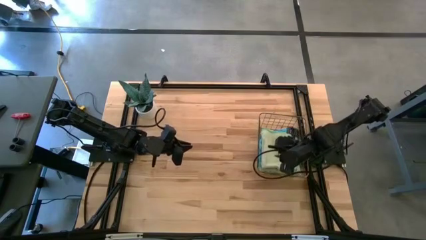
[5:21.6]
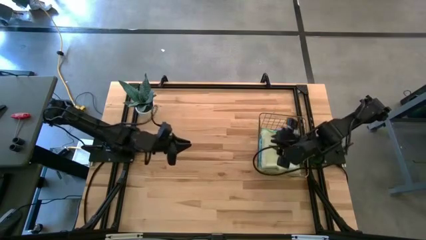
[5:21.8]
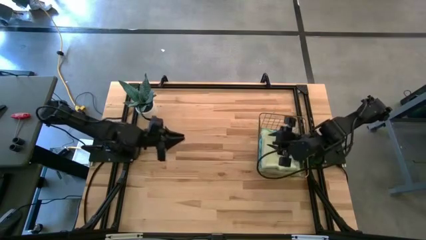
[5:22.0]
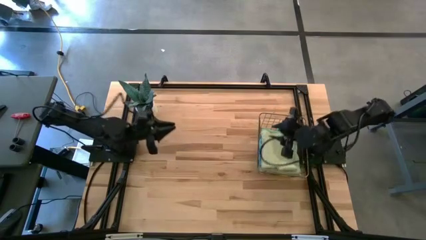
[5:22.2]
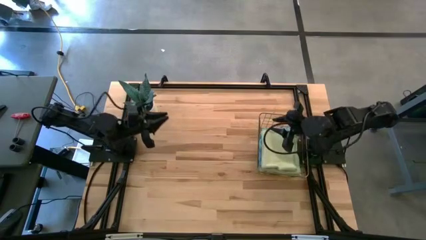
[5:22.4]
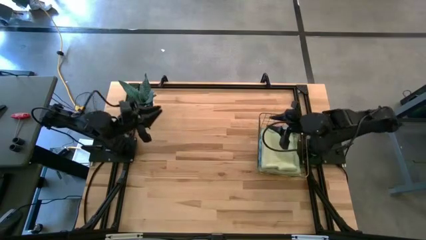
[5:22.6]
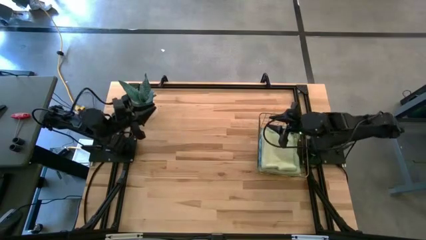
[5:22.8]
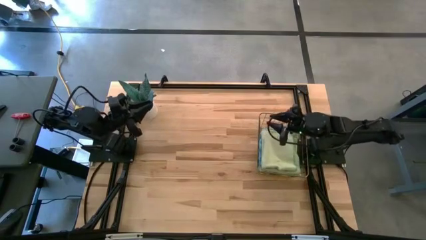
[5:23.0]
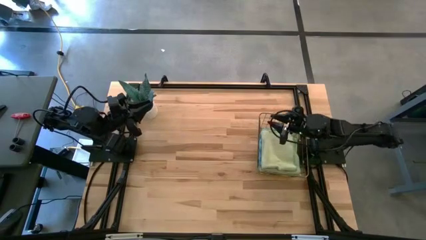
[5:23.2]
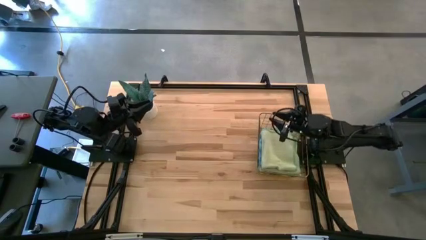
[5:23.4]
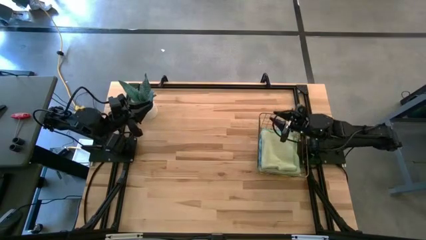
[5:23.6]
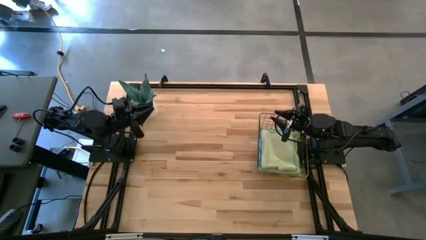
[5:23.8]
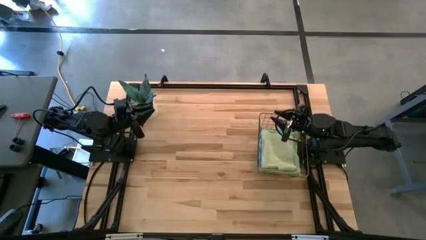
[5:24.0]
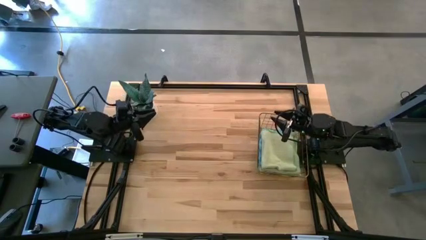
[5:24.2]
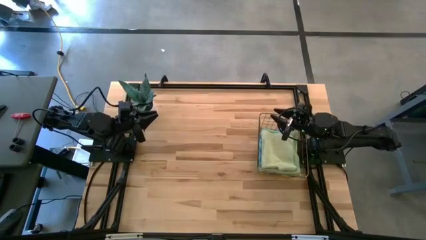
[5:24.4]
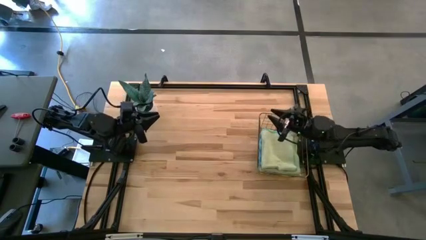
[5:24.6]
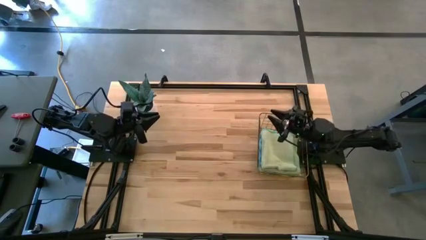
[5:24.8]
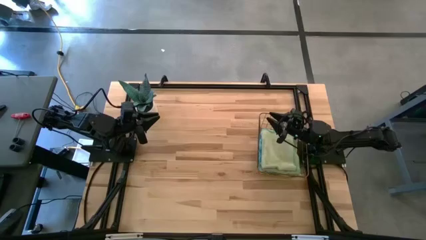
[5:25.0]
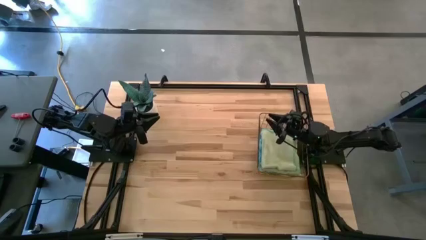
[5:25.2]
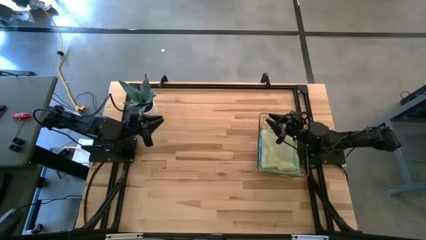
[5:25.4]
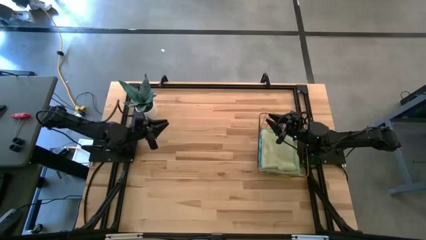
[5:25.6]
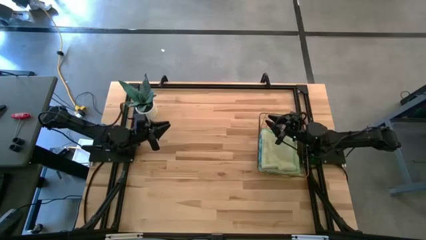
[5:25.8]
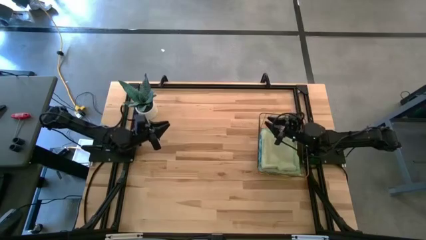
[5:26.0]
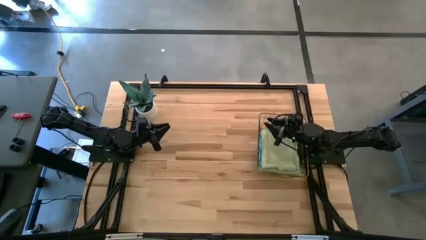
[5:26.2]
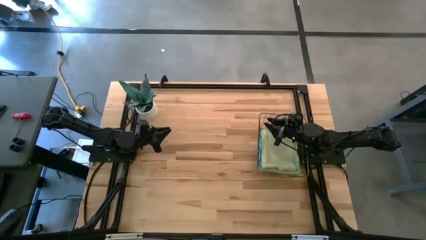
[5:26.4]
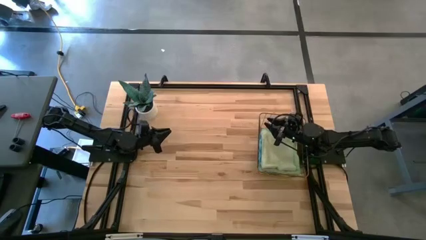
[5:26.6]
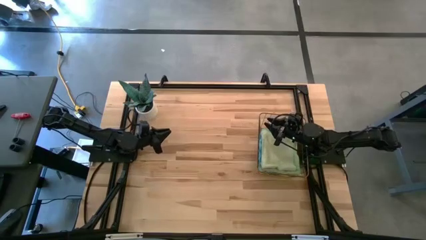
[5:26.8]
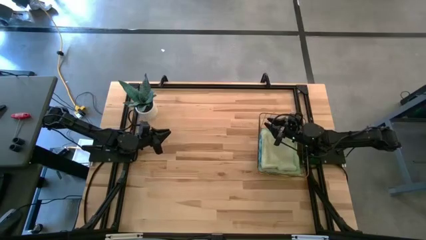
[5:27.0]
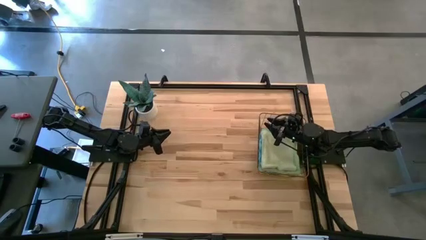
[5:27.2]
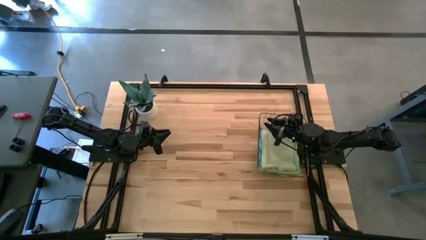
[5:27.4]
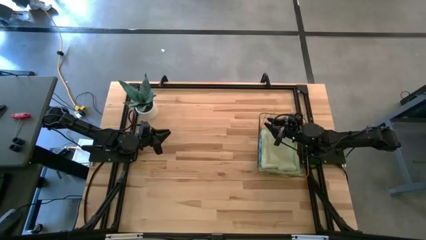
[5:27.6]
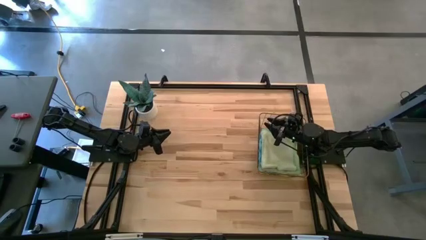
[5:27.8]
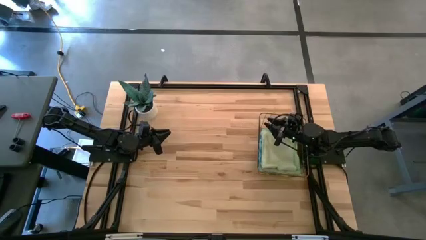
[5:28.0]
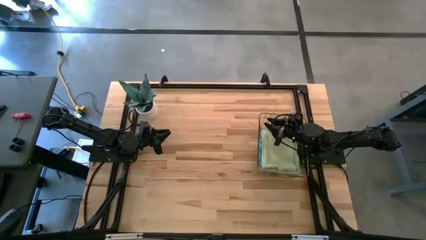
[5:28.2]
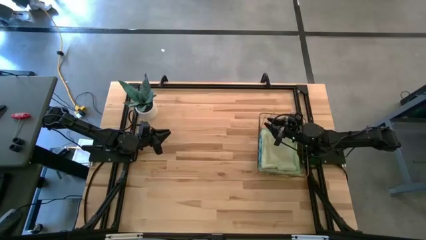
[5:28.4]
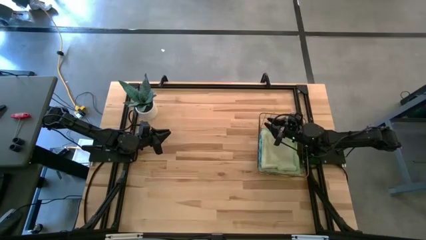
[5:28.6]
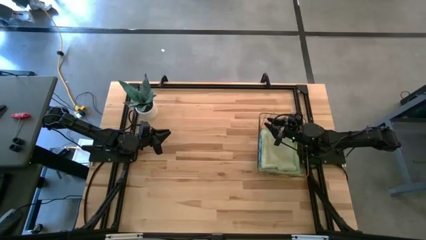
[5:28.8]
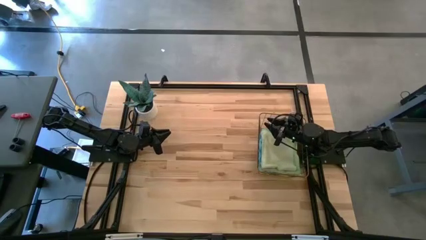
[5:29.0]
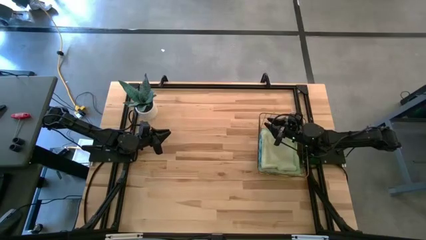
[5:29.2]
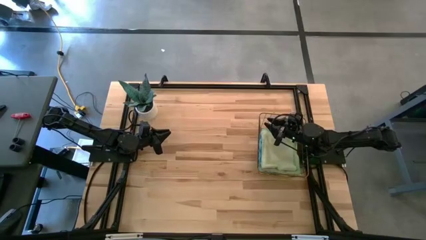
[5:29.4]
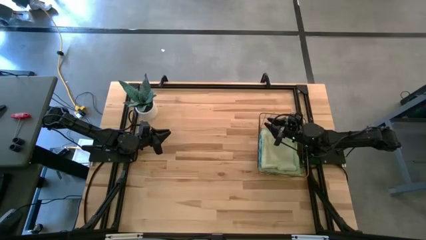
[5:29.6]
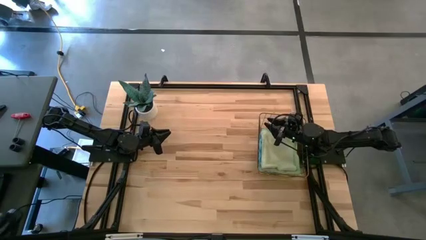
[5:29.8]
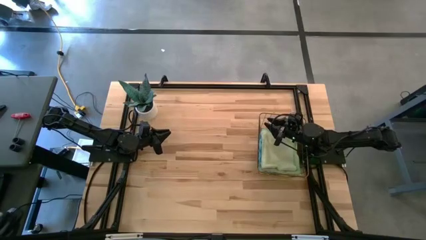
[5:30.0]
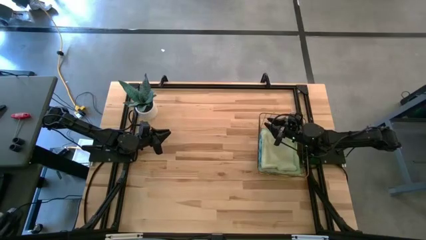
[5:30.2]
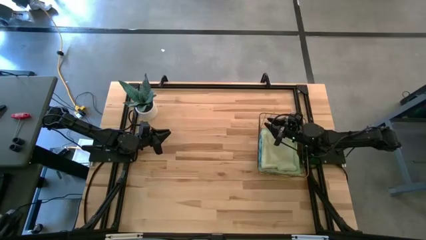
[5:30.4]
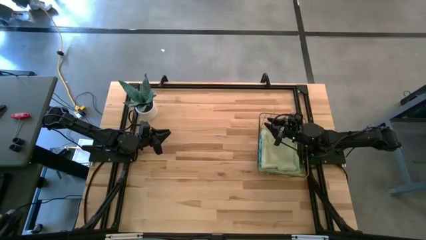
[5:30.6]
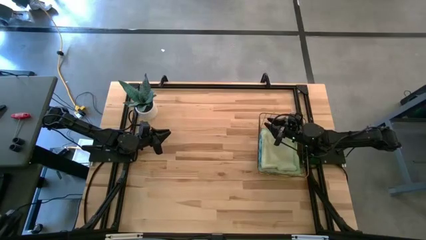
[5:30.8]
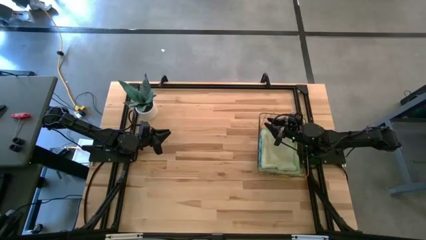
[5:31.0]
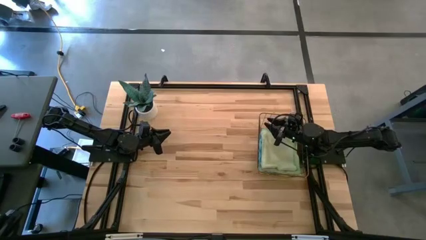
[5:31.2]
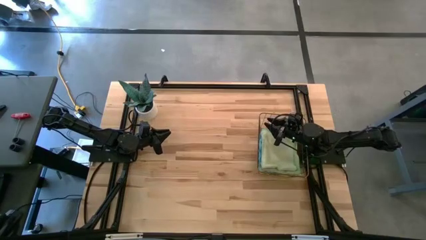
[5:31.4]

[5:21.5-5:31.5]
Task: Fold microfiber towels
Return to Home Position

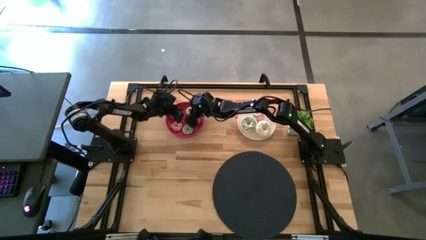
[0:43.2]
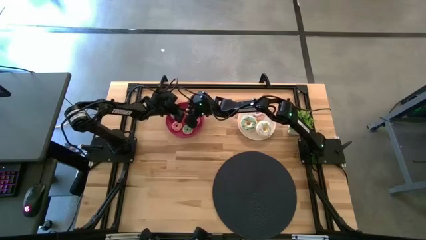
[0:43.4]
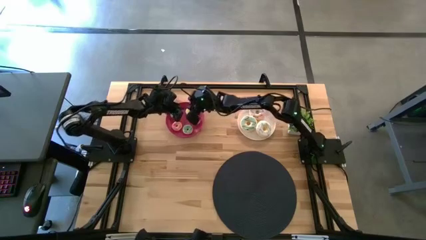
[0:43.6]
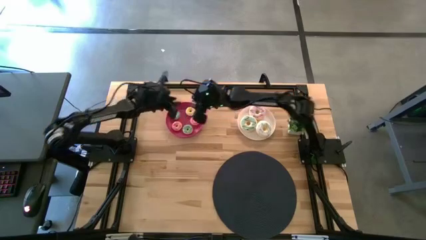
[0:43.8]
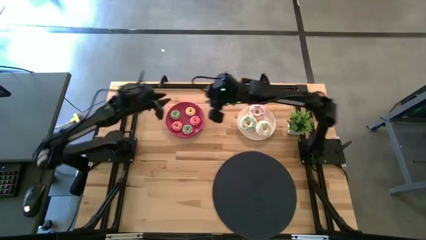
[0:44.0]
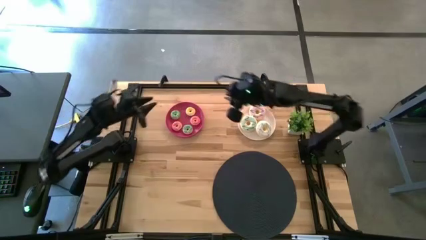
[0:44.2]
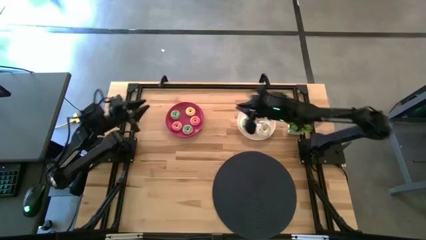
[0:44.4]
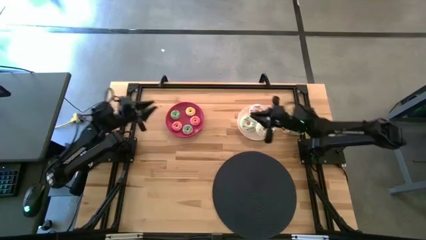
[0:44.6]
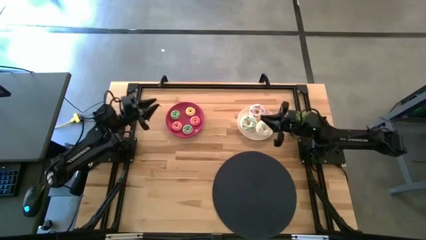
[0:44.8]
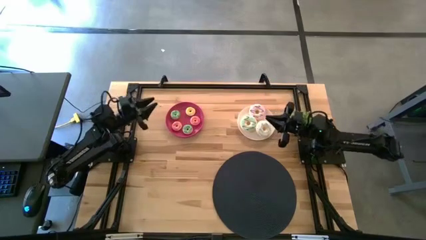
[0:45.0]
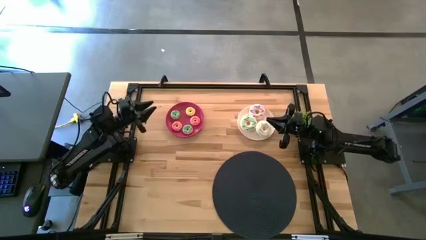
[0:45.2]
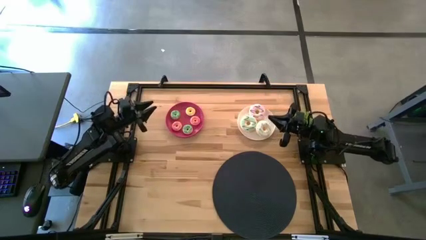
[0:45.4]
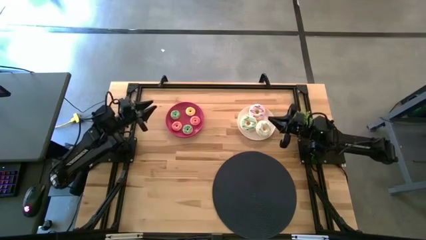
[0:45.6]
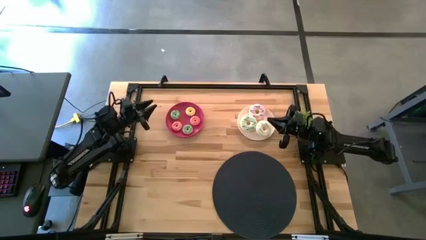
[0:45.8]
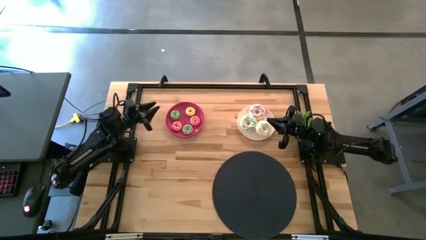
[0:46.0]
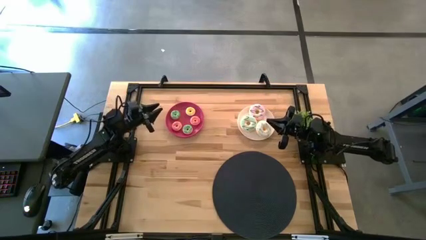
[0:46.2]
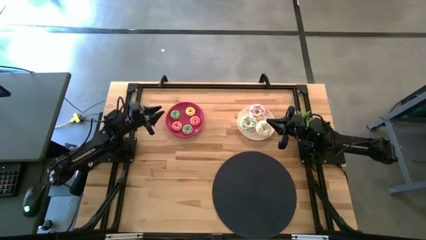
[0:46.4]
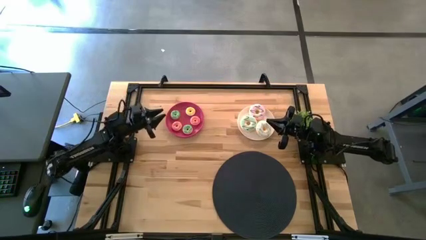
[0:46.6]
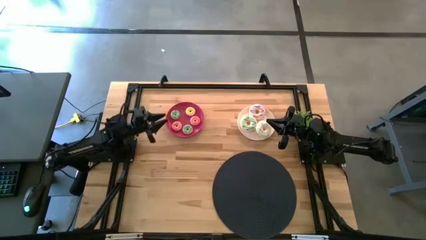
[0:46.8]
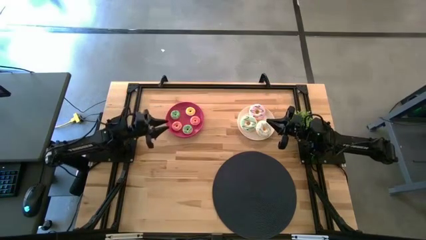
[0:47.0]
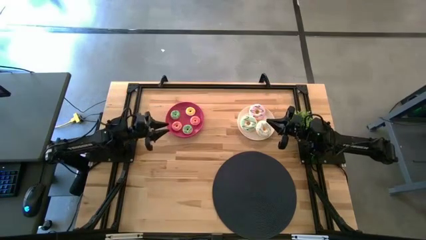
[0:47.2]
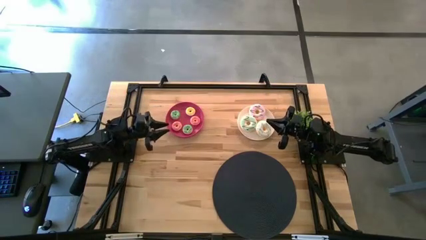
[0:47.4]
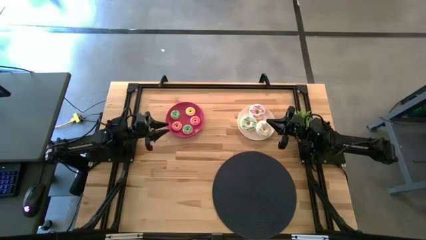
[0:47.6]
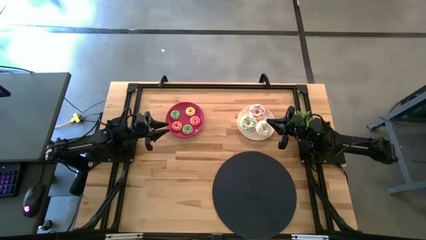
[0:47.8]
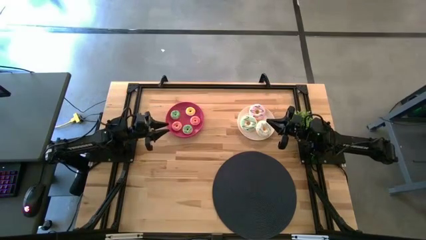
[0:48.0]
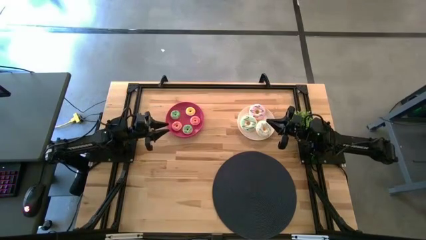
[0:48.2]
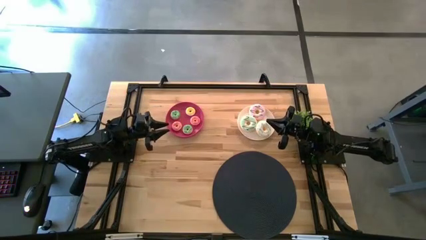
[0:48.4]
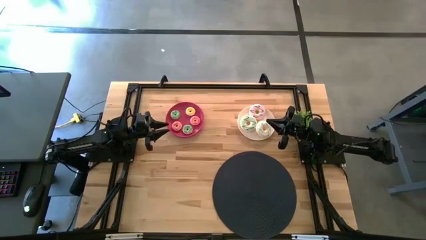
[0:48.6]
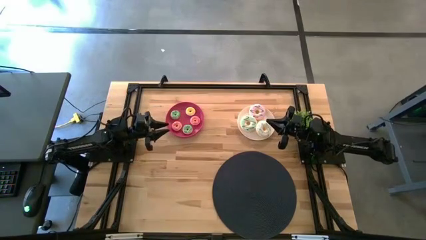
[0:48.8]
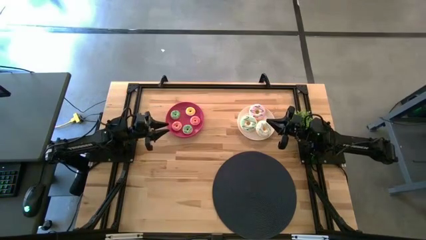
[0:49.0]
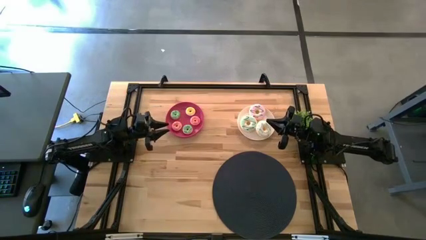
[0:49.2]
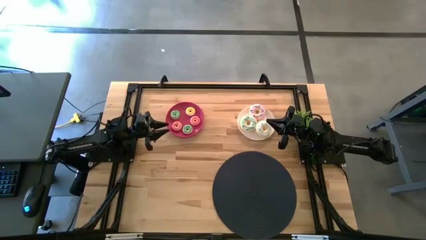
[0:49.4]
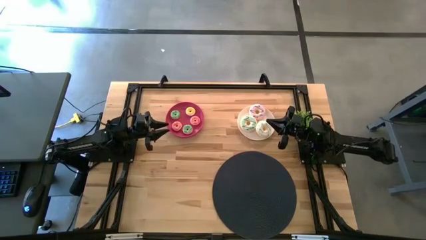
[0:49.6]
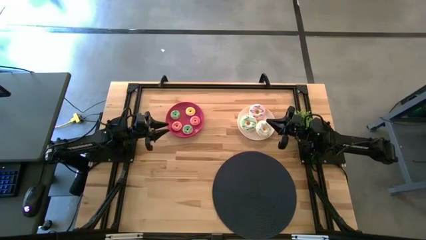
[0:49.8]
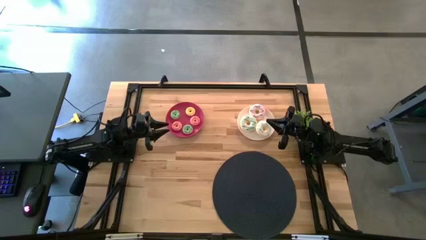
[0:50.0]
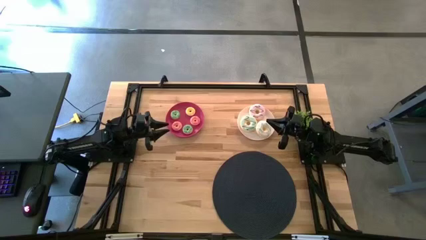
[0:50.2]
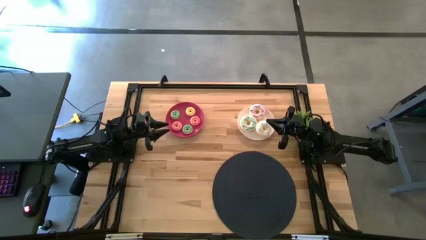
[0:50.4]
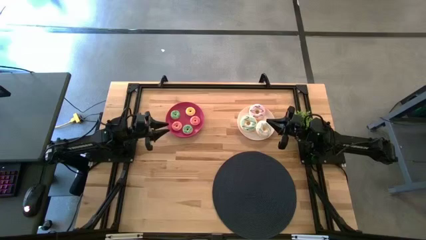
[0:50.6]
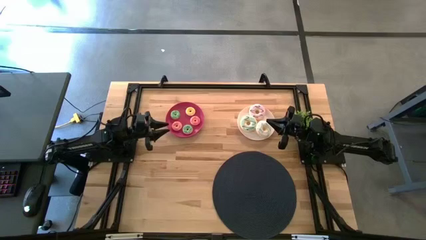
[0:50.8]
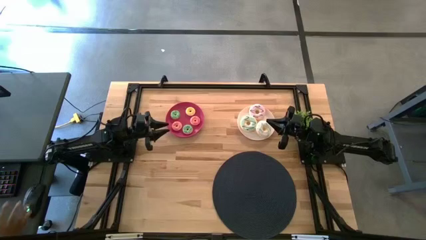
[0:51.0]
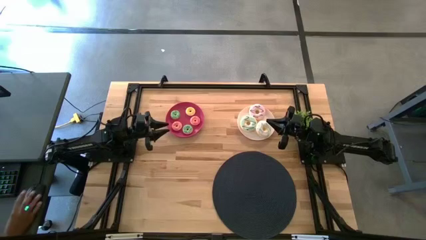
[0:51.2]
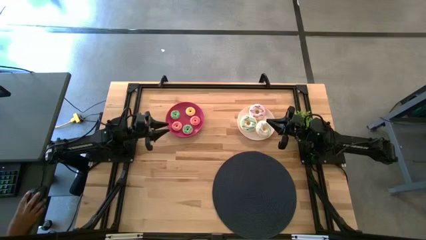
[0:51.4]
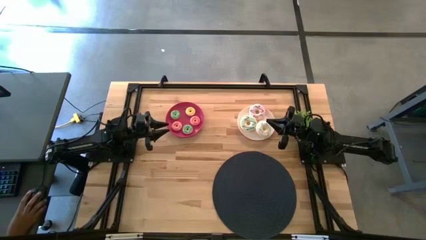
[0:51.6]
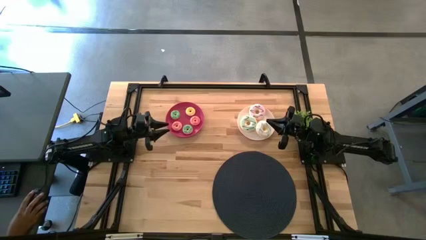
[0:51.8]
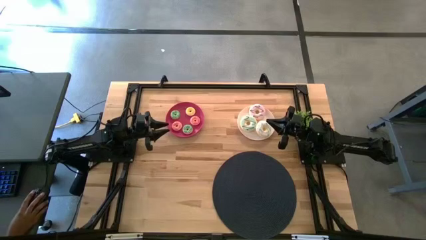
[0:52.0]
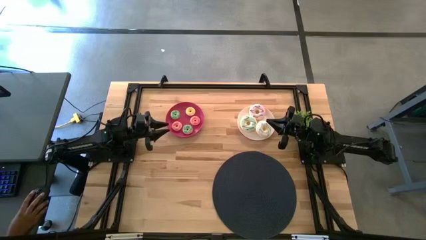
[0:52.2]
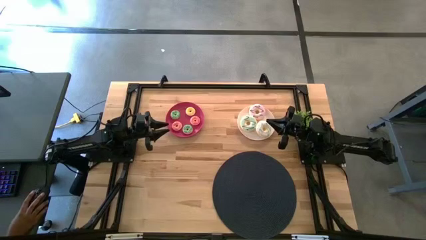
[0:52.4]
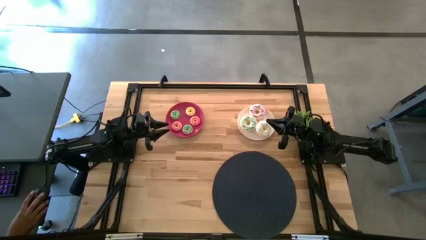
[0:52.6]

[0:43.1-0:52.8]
Task: Pick & Place donuts
Return to Home Position
